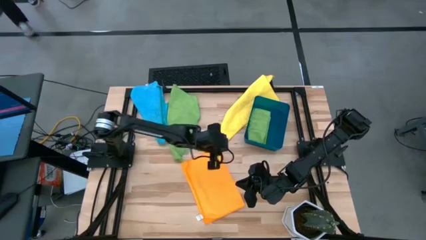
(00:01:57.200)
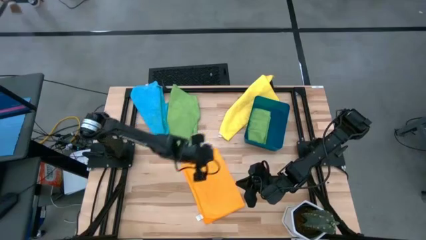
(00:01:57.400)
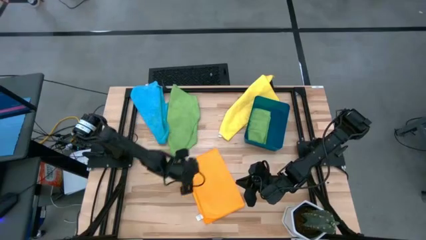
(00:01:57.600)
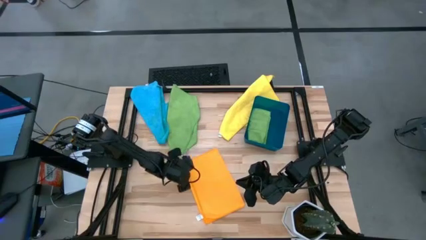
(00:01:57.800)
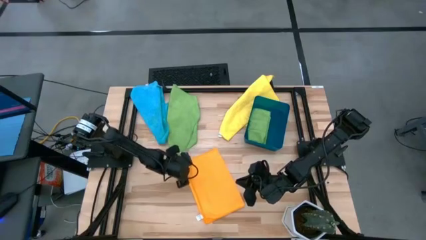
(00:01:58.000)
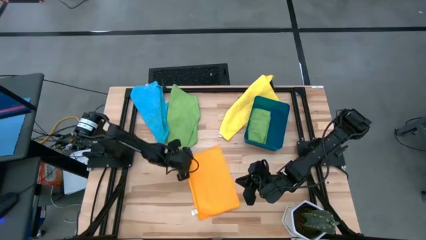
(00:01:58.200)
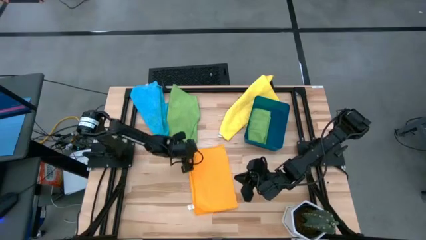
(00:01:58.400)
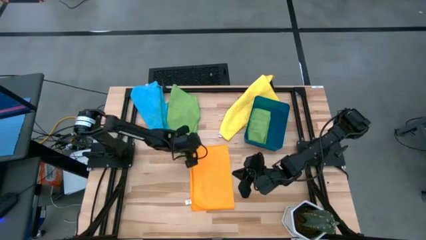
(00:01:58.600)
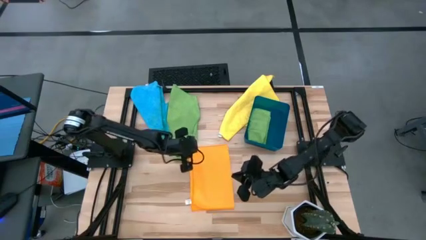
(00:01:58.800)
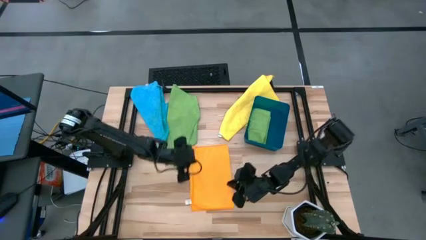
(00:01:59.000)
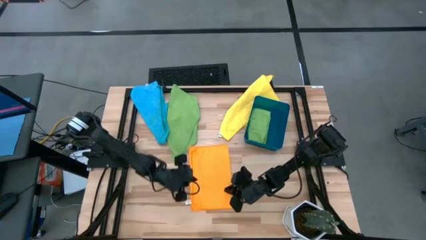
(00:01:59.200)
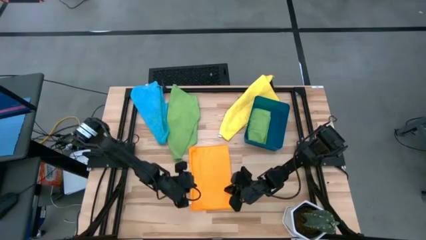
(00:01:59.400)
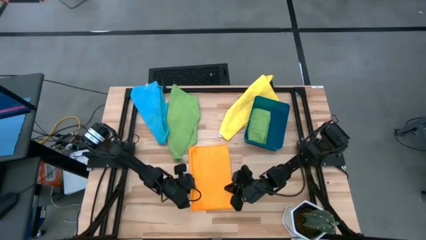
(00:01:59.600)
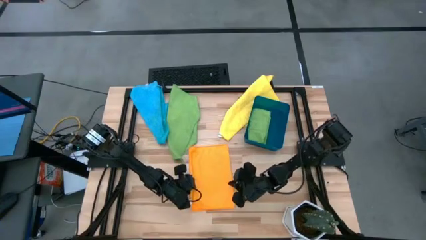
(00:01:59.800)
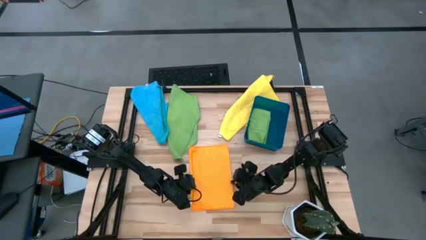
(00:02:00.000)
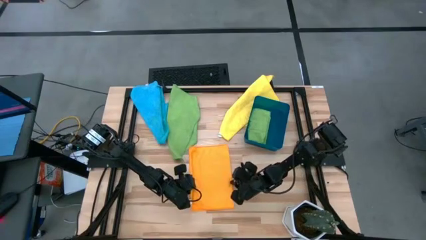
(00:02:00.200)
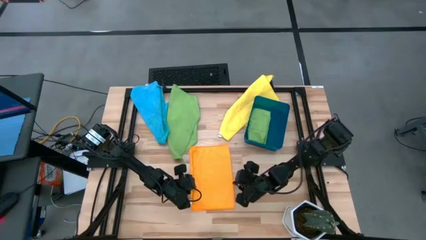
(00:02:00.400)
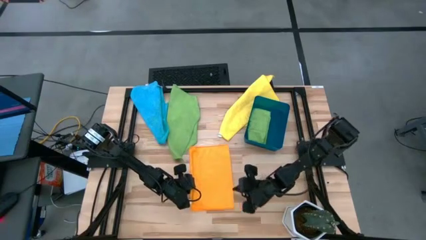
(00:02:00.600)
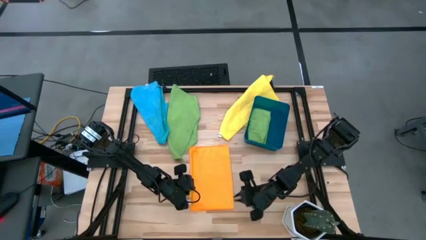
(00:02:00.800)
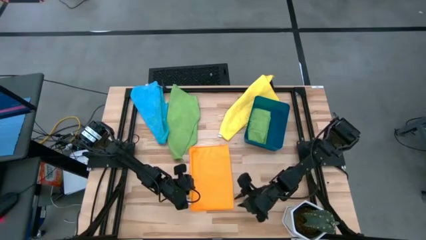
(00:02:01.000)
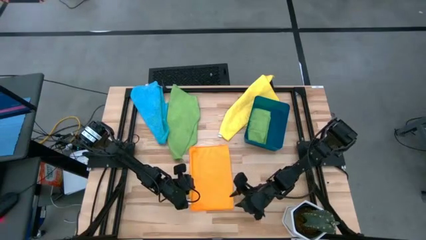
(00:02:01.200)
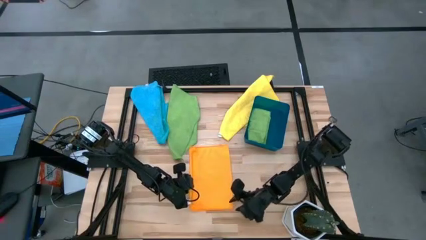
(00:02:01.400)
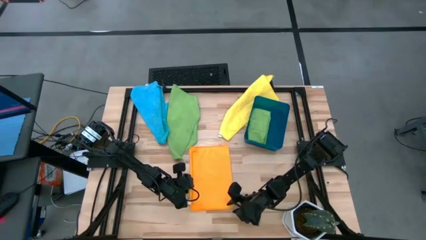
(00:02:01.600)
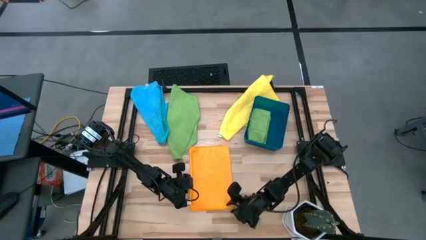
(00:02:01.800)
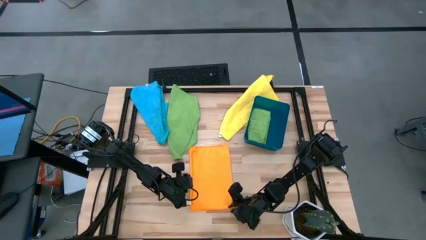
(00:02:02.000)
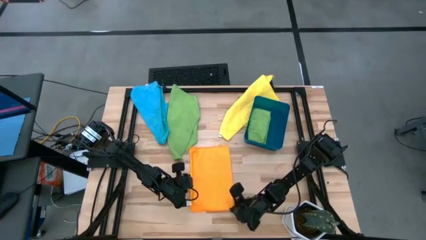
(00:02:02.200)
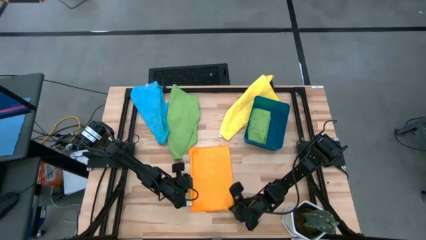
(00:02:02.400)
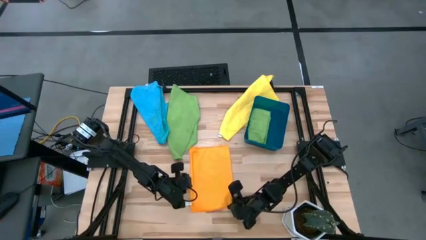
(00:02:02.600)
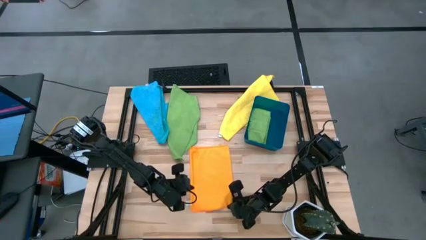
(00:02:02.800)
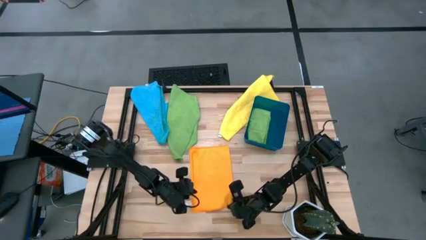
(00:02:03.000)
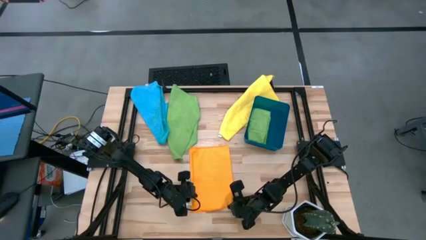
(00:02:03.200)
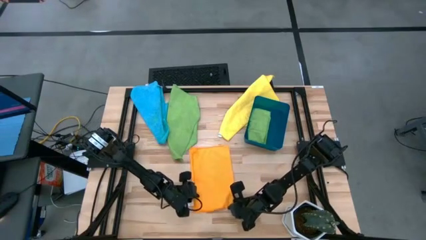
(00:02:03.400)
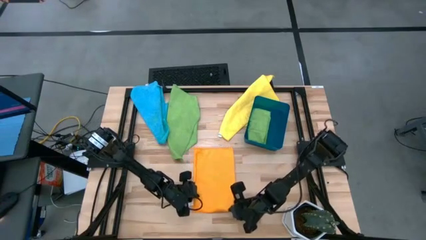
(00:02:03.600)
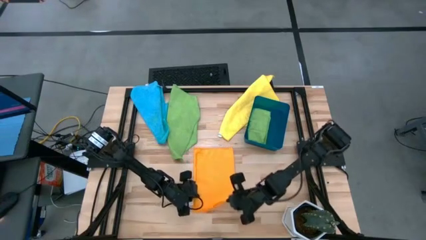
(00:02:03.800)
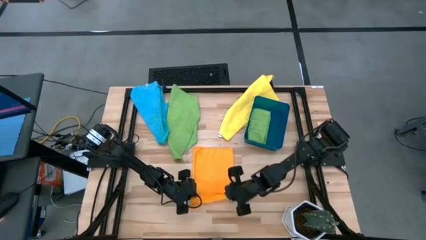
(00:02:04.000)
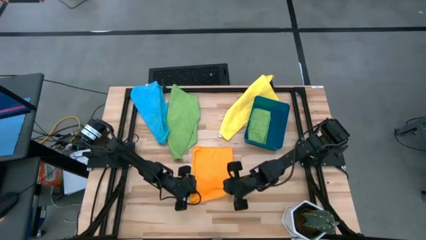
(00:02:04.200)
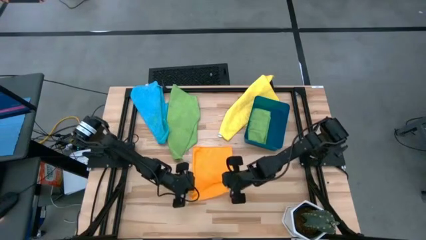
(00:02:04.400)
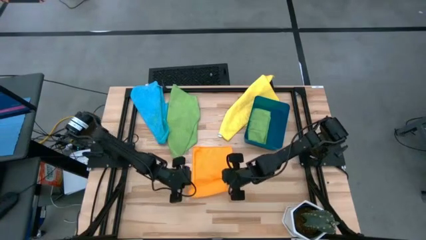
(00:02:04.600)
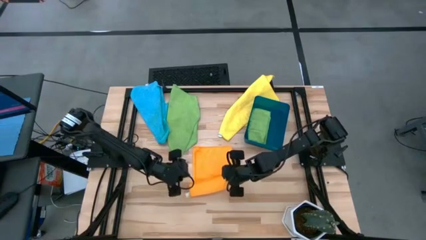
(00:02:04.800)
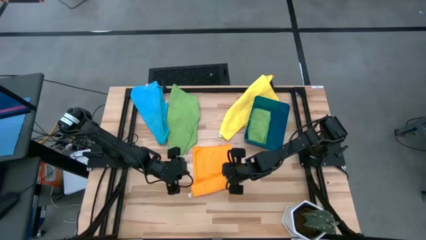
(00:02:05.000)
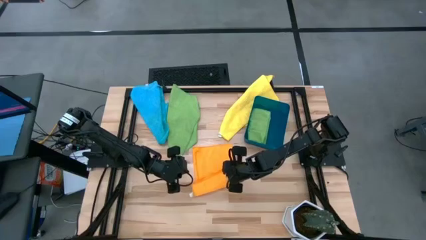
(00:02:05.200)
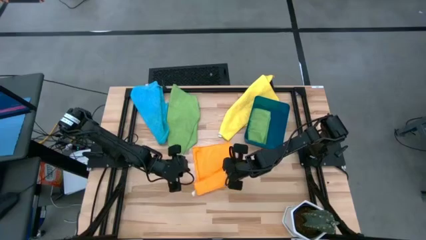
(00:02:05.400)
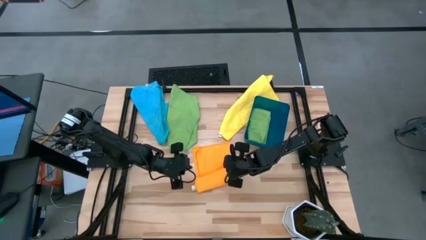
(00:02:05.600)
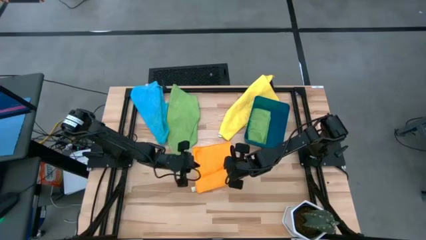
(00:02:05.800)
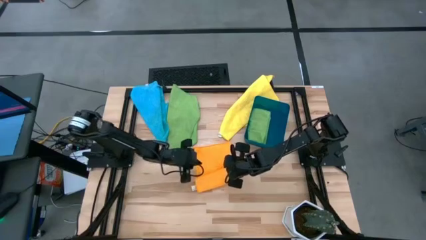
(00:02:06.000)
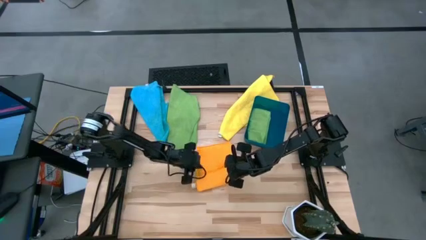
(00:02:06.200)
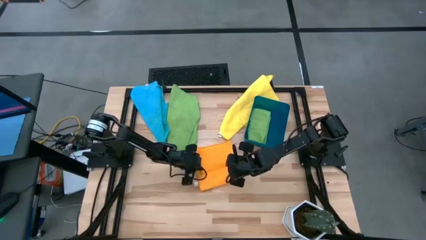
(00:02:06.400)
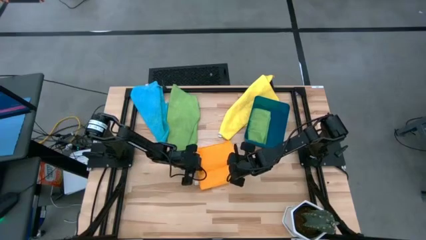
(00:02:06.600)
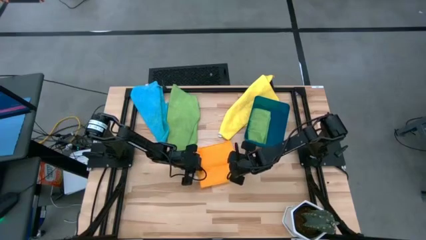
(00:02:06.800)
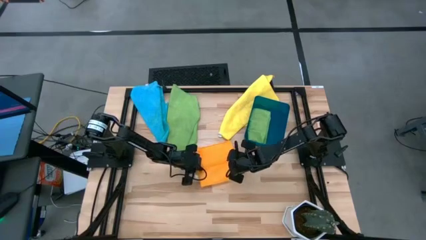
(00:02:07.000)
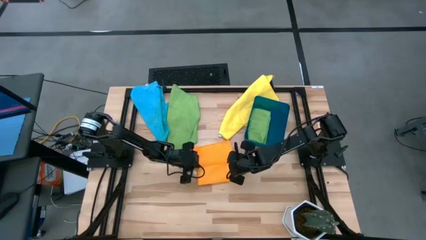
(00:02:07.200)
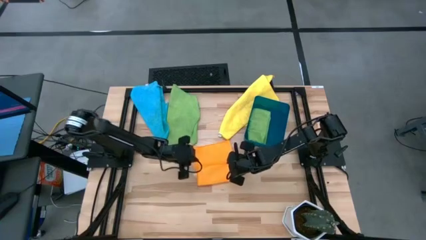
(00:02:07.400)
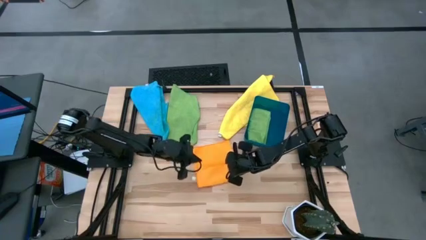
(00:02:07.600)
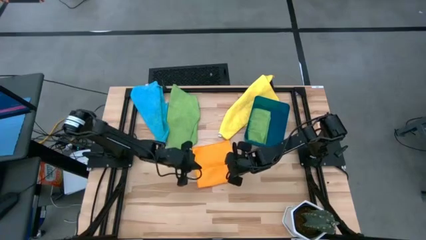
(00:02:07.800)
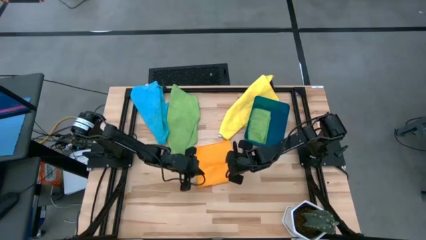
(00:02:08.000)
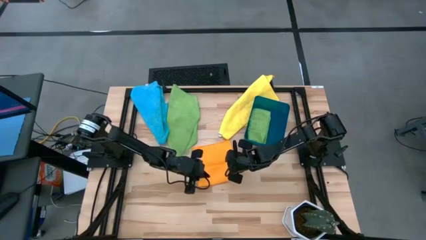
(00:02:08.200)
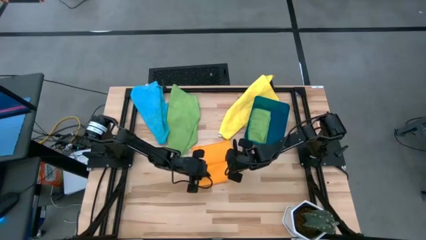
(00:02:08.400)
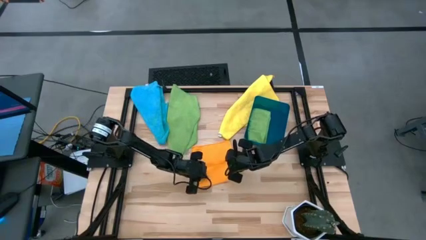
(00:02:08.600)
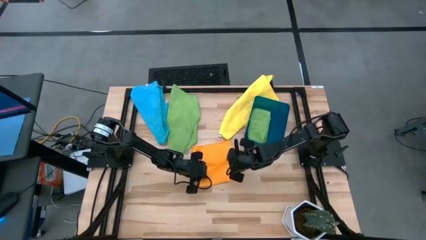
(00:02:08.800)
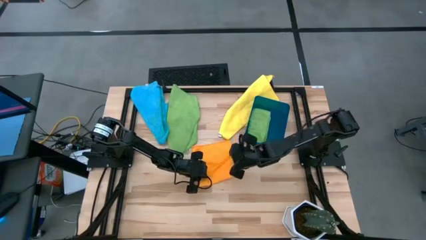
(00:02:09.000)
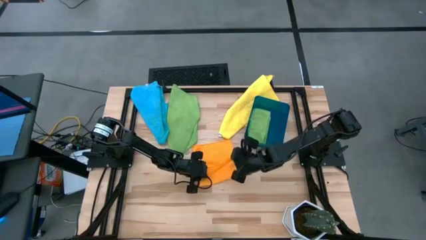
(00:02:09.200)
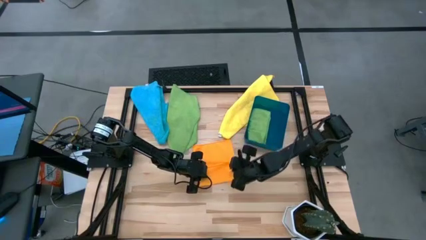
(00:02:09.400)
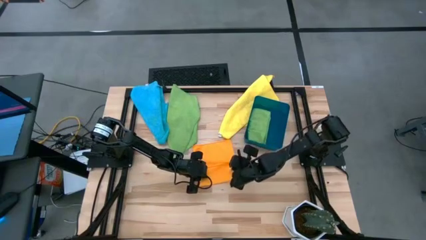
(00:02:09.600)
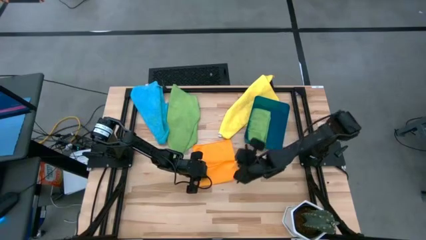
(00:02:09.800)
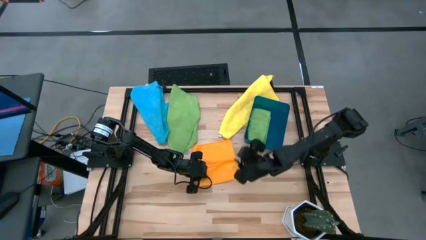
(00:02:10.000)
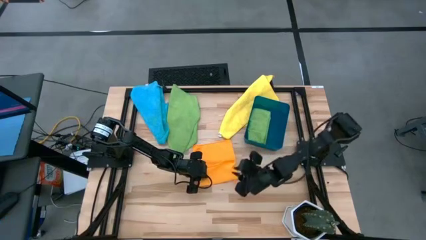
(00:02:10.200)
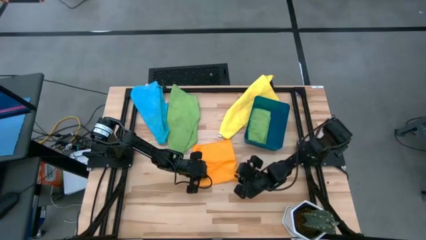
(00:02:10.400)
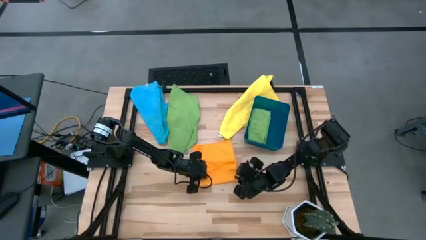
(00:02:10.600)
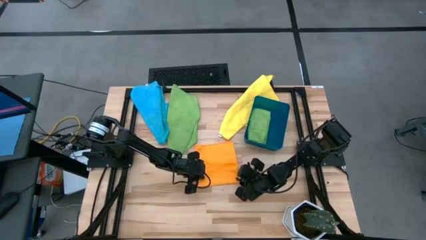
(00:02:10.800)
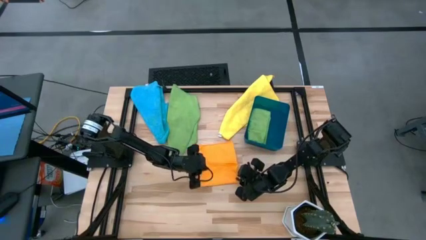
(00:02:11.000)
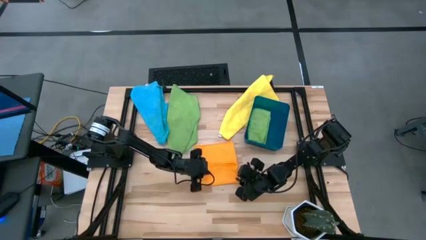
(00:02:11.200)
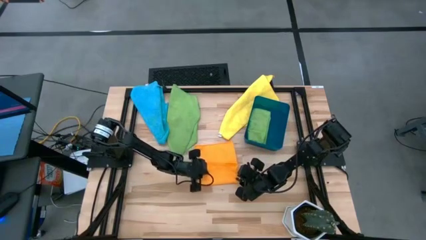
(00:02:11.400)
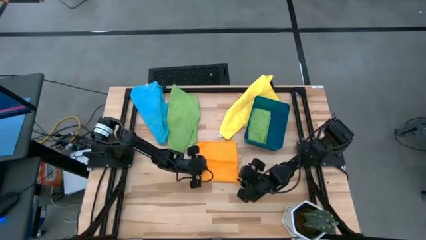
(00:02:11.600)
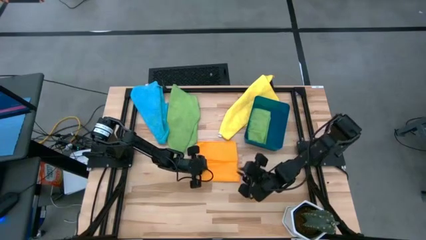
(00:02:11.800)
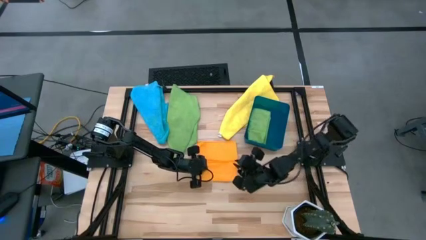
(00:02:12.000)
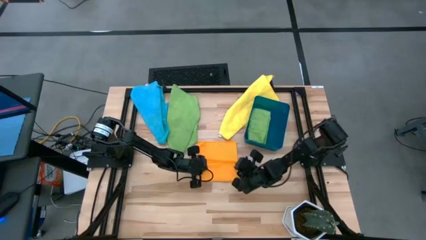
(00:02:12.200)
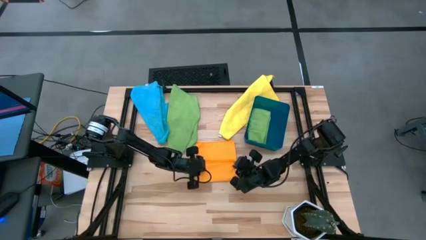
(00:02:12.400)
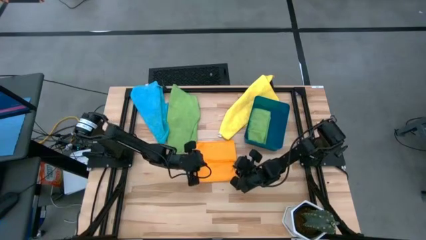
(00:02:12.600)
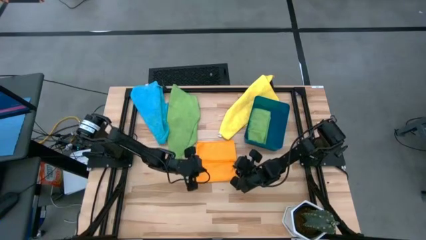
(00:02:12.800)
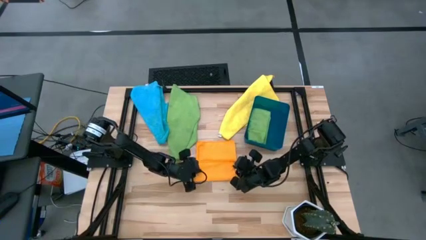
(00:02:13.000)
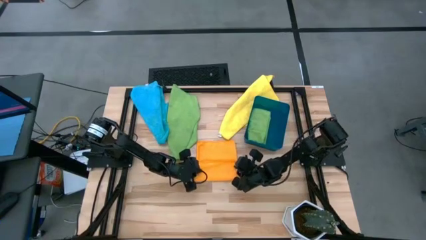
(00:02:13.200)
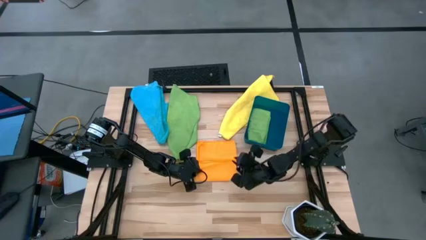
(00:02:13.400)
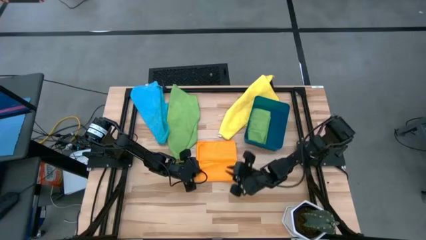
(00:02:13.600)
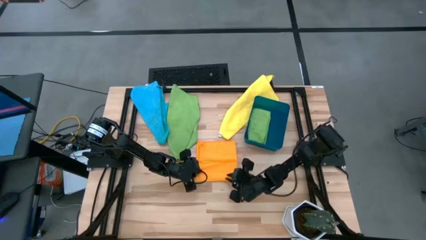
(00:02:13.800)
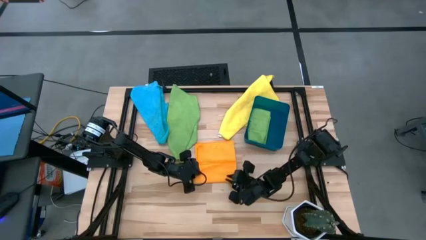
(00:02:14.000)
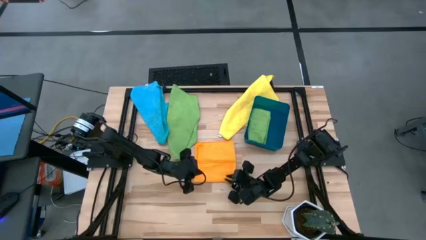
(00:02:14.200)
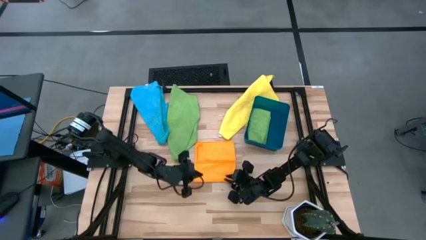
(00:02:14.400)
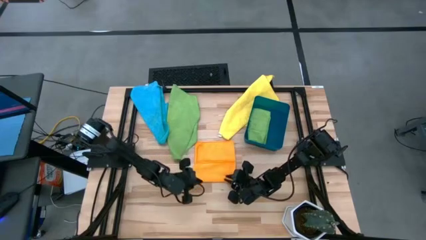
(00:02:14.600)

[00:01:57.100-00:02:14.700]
Task: Fold microfiber towels
Fold the orange microfiber cloth
